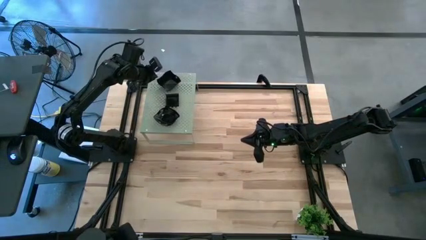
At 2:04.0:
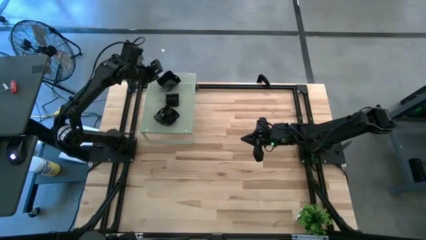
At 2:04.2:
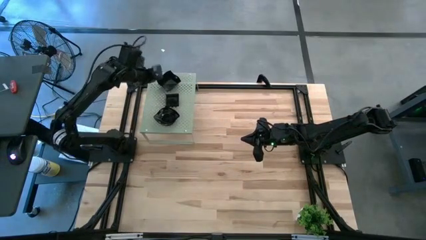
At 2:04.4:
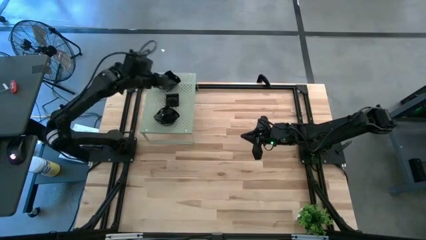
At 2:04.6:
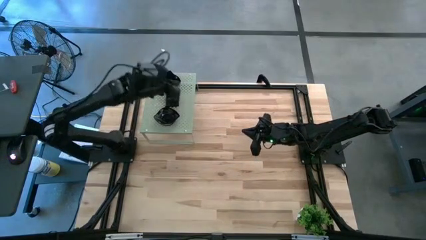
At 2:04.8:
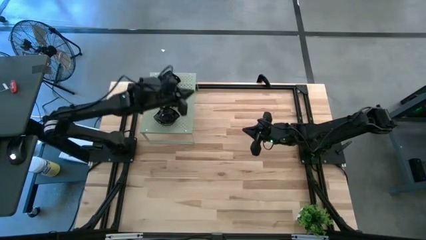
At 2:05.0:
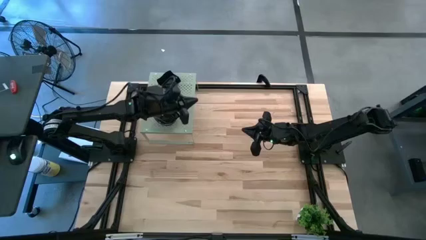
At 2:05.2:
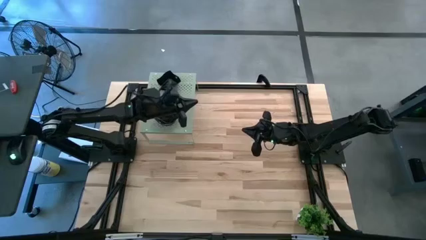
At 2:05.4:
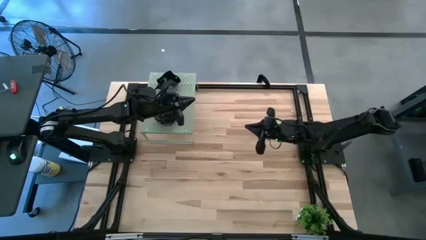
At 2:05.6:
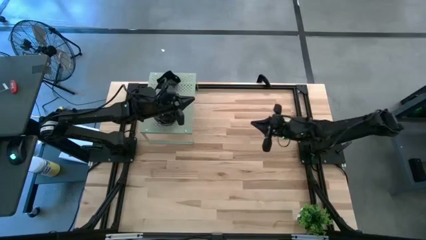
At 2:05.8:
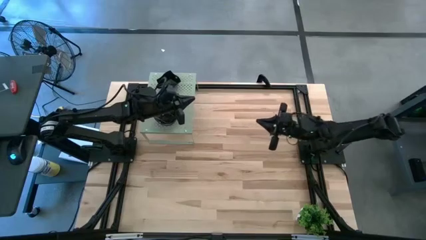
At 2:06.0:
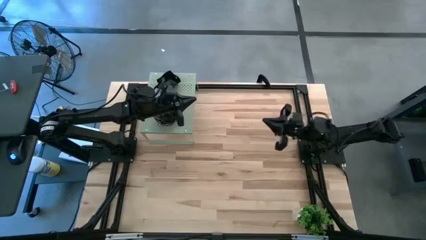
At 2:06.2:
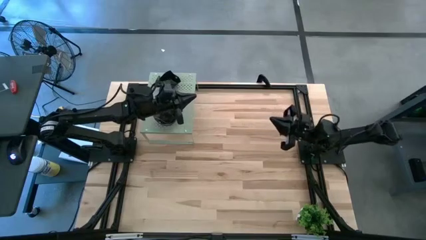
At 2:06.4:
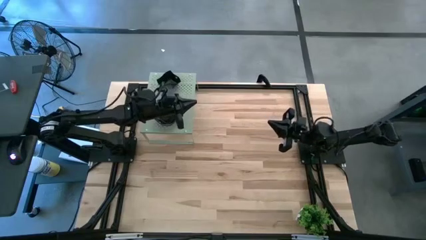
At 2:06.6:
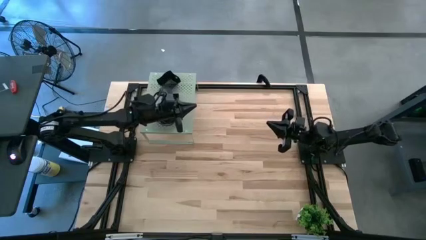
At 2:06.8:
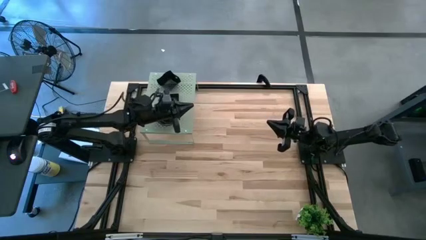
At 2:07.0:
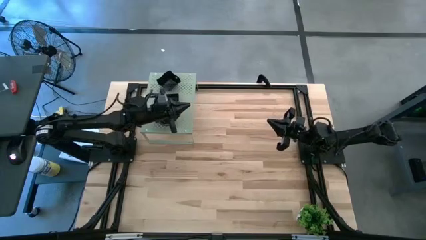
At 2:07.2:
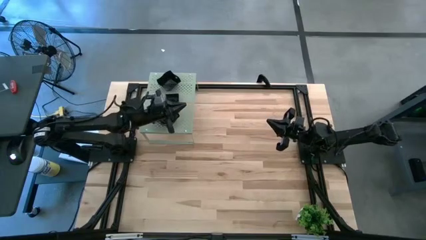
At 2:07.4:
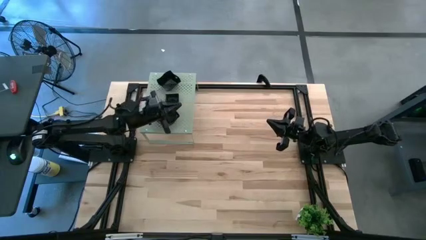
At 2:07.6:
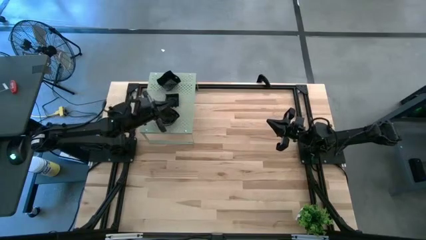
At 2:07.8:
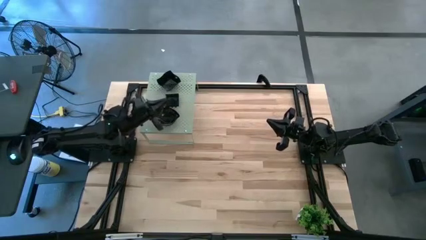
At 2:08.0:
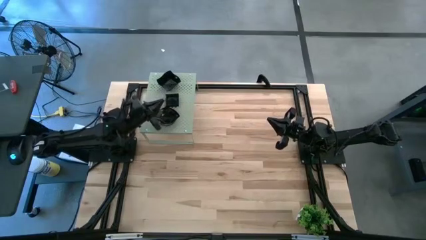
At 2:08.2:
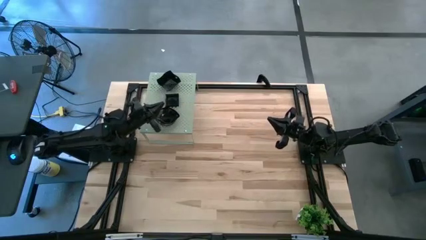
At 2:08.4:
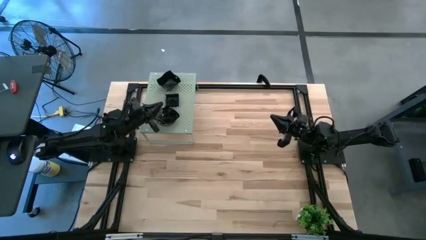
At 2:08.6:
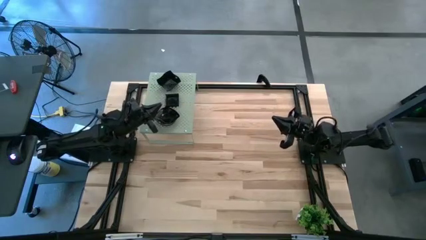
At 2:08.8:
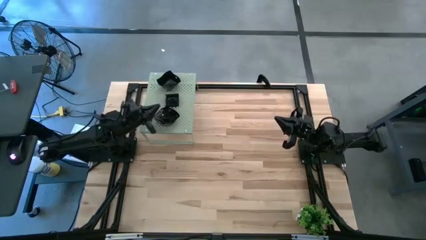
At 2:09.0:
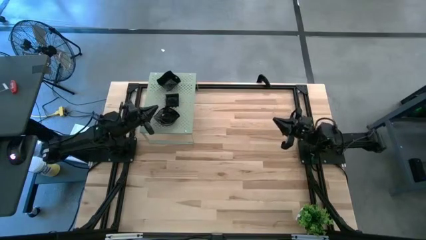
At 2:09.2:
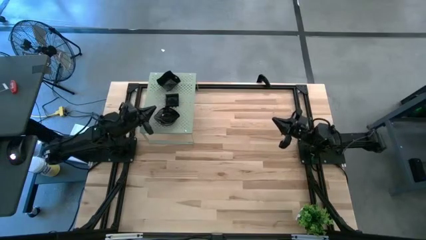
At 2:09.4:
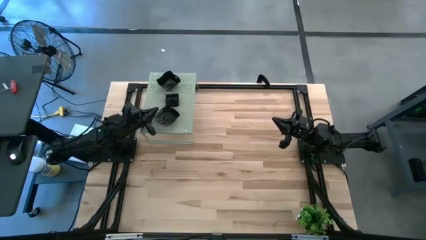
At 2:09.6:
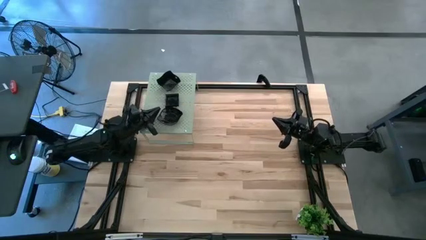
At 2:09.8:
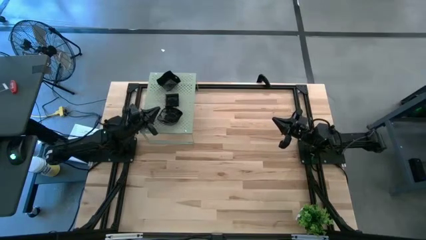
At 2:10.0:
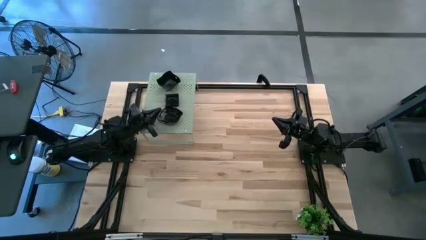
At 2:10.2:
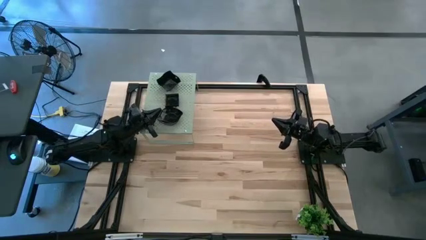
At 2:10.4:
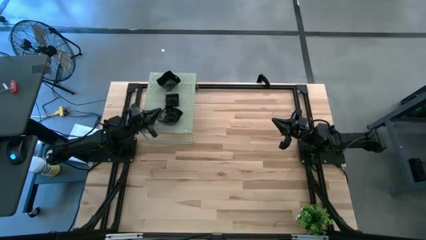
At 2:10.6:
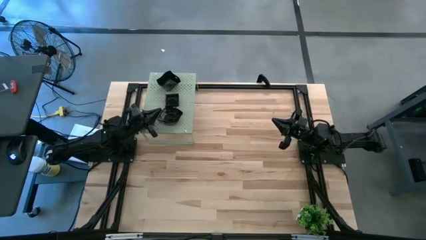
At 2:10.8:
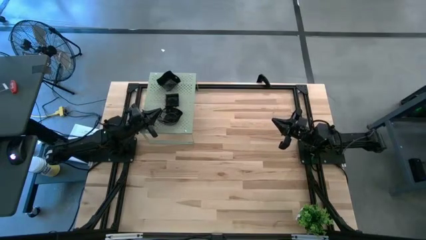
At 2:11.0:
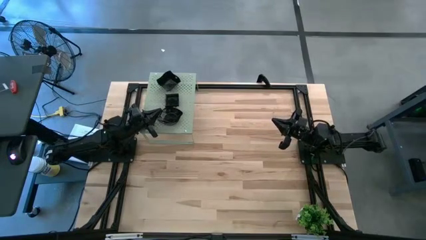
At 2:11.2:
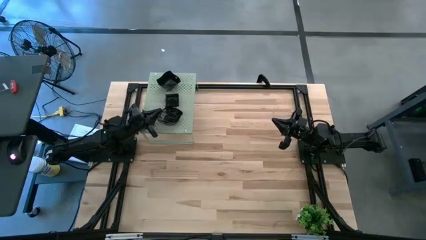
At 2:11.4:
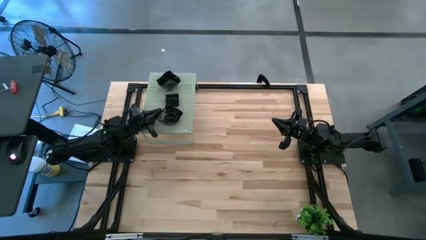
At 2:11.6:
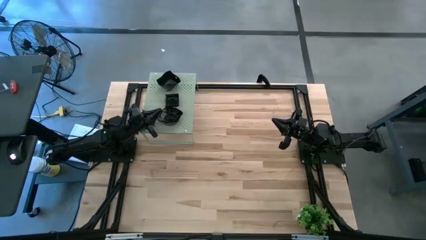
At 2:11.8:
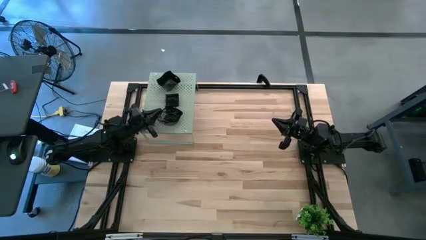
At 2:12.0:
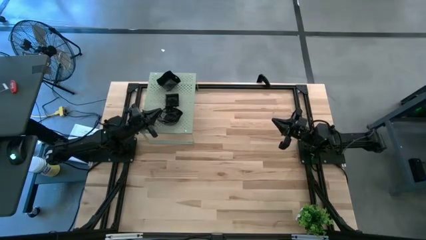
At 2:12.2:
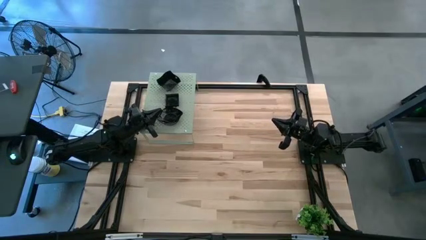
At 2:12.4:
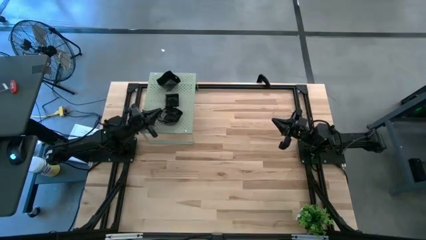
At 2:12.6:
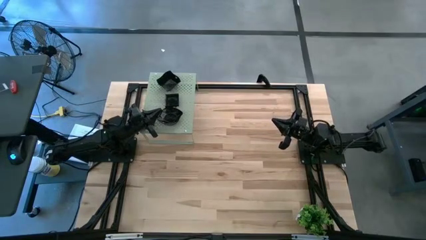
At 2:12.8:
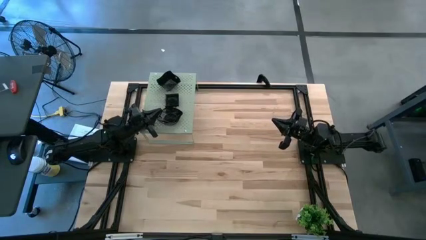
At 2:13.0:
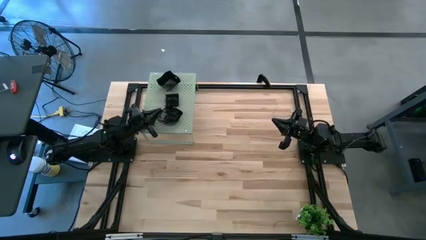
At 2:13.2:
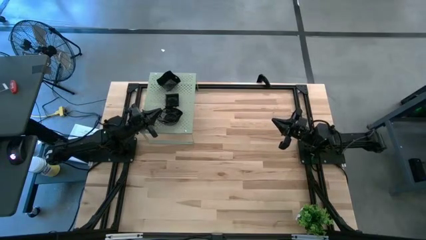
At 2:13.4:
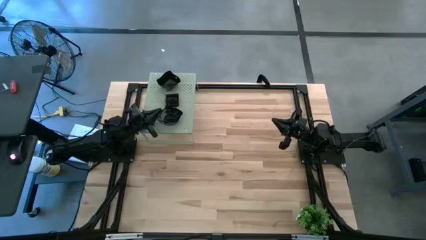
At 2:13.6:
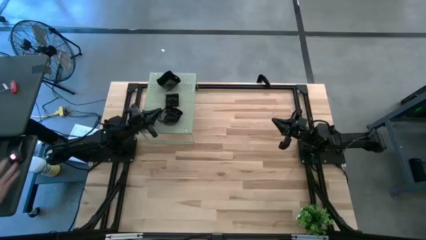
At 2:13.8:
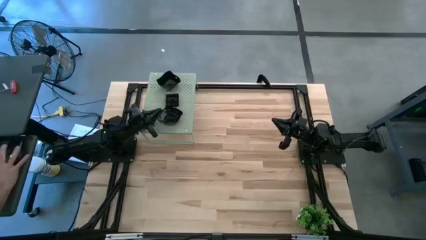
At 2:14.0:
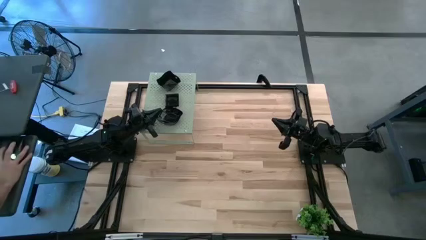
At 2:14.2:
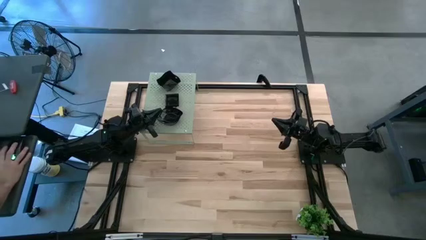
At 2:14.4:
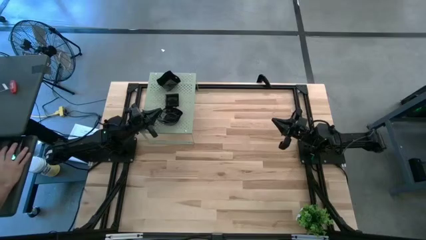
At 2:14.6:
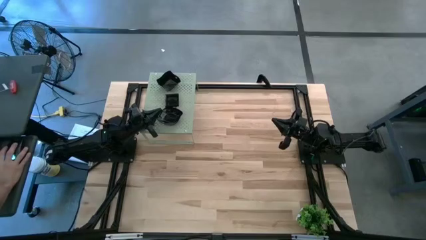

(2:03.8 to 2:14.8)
Task: Pick & Place Mini shaped plates
Return to Home Position

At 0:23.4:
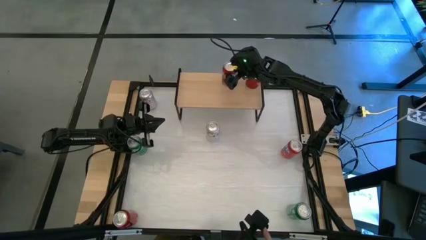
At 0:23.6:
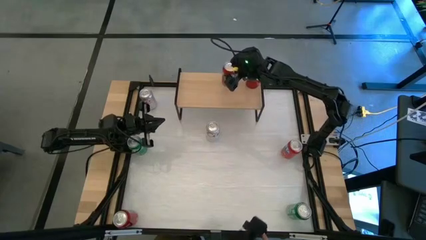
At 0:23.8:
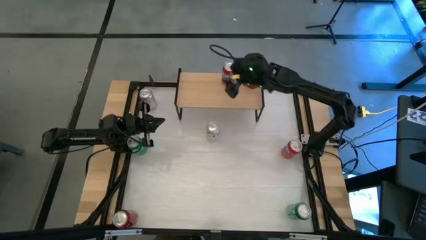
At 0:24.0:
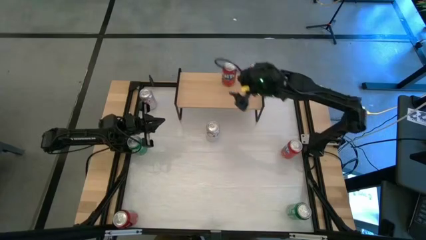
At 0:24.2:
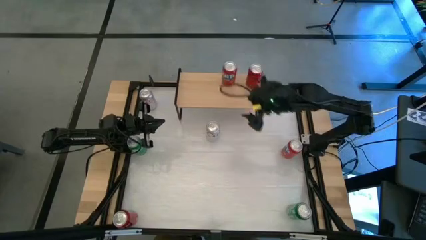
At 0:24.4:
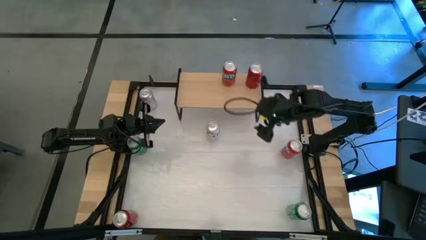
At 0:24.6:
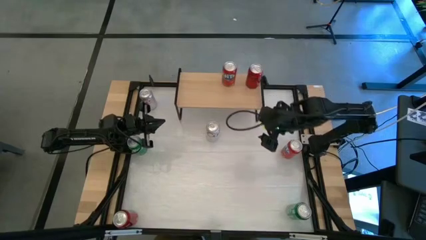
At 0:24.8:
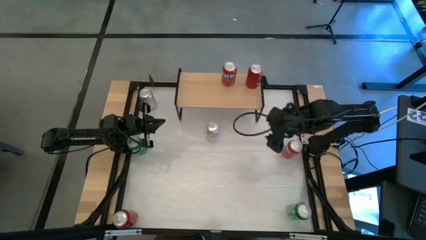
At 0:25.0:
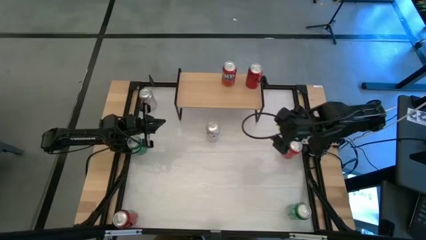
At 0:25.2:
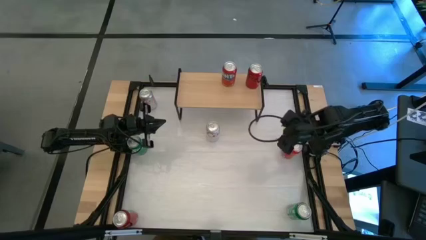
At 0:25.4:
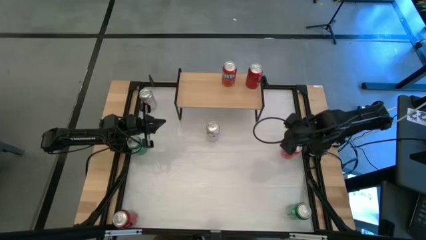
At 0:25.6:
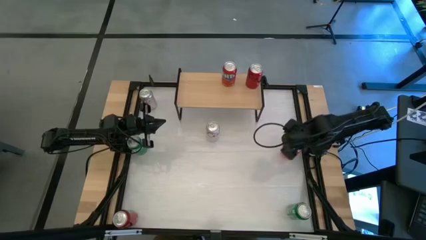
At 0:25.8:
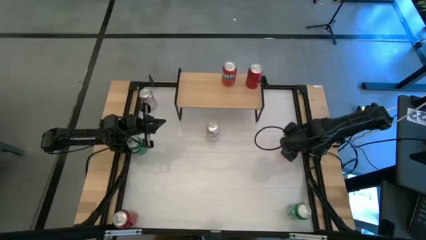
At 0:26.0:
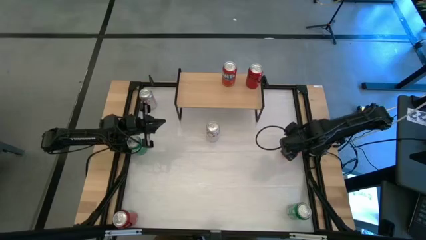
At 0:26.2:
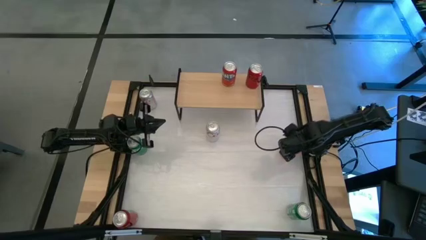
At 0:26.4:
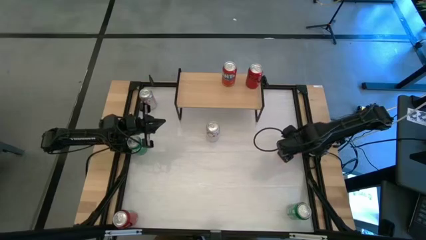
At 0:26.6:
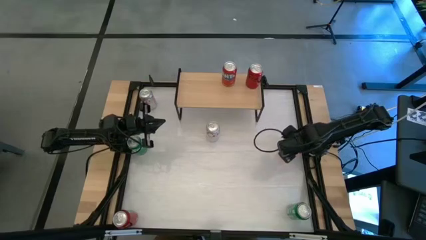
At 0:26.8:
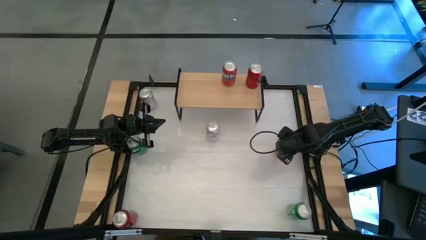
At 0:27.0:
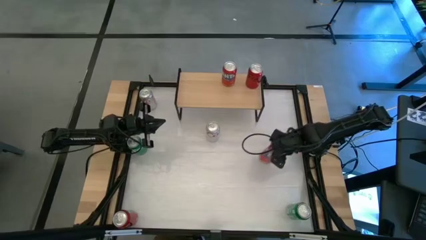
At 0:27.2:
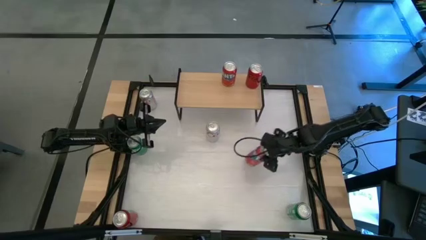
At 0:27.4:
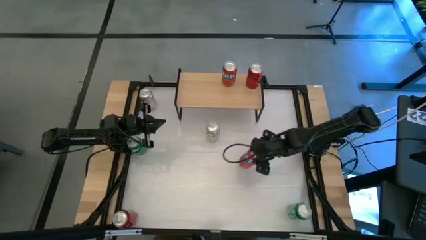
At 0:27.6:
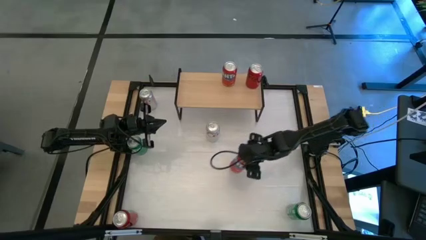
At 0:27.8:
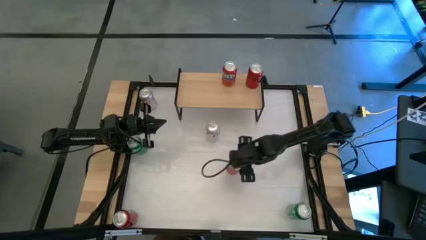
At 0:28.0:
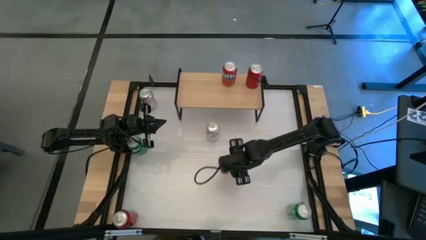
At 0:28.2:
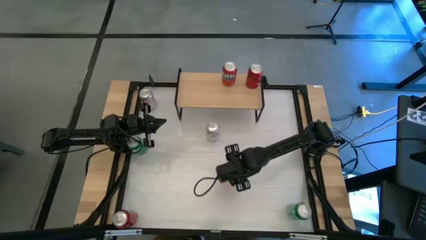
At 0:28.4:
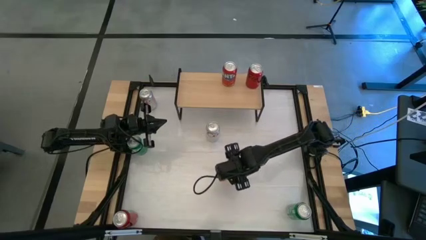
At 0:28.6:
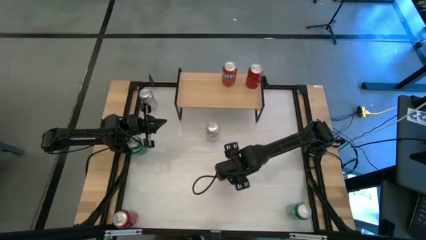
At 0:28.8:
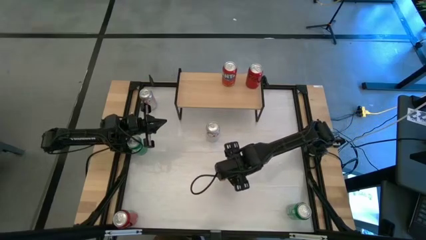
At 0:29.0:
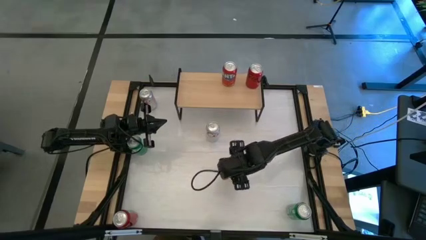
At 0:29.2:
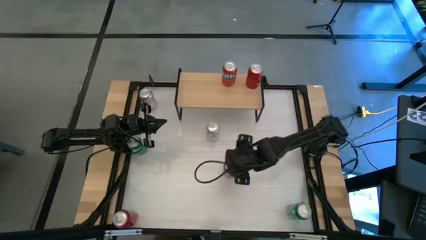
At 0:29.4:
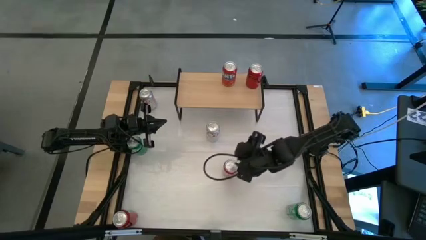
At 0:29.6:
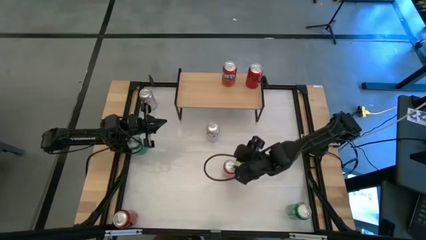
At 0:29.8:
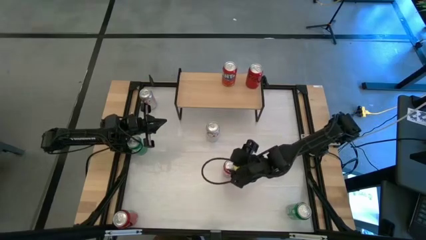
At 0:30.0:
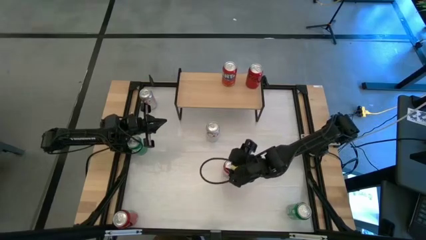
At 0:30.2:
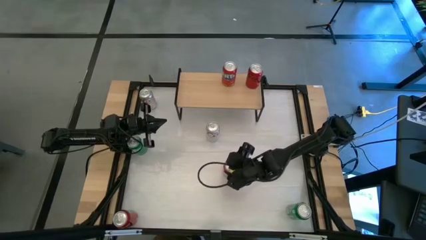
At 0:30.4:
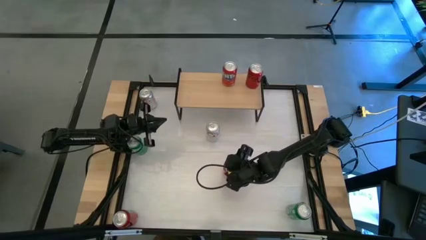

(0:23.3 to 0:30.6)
Task: Place canned beverage on shelf
Put the orange soda can on the shelf and align with the other orange soda can
